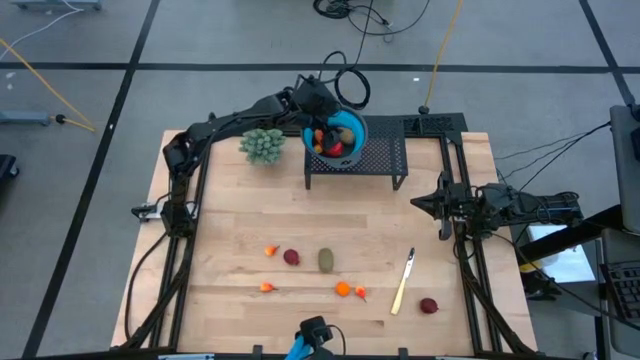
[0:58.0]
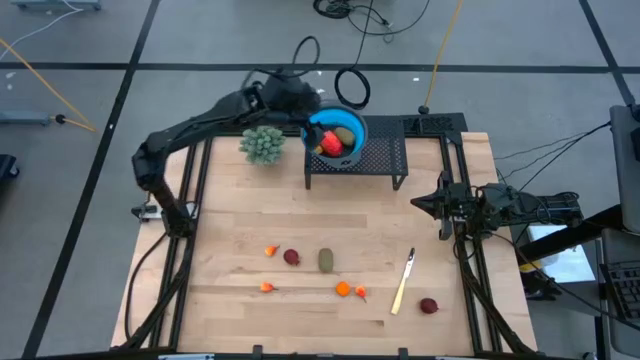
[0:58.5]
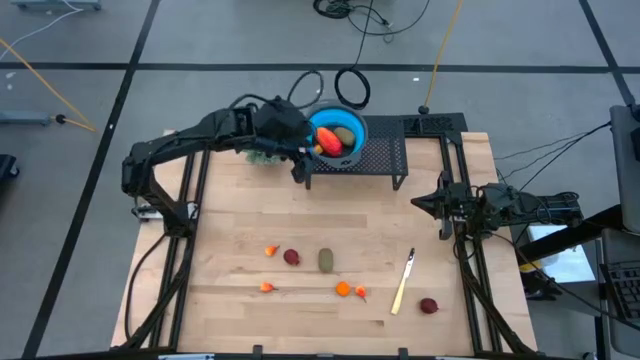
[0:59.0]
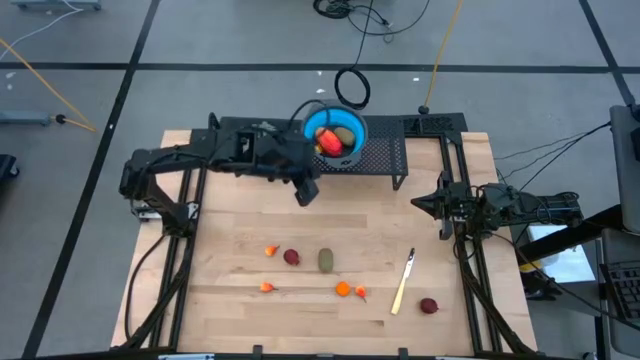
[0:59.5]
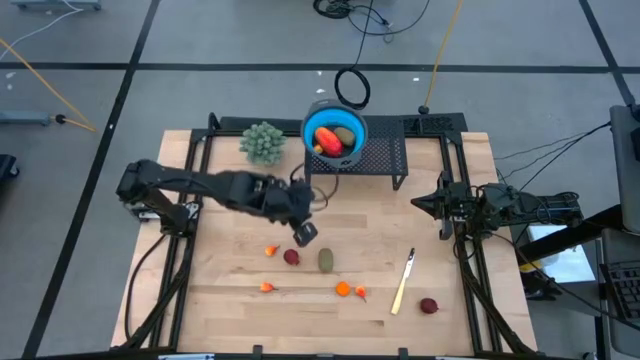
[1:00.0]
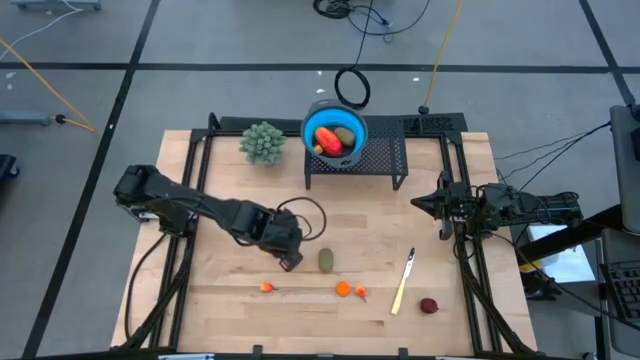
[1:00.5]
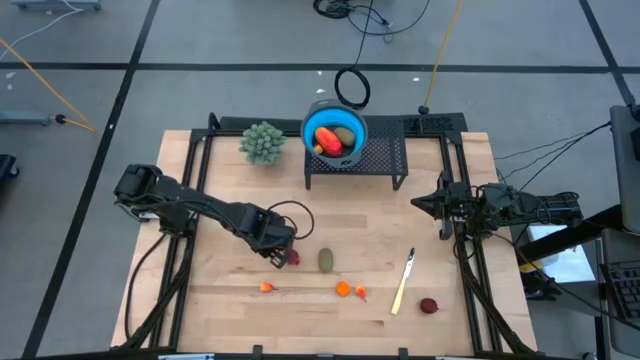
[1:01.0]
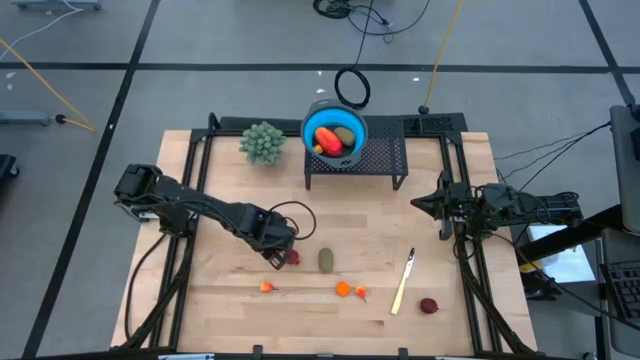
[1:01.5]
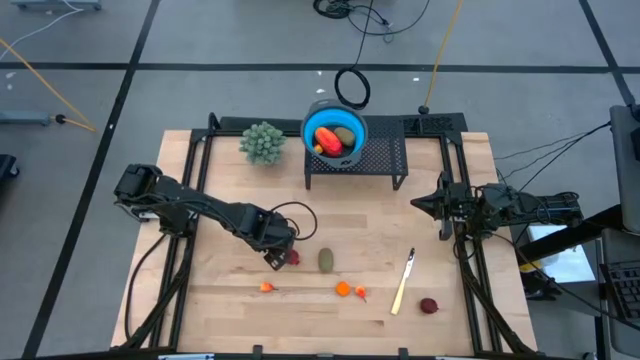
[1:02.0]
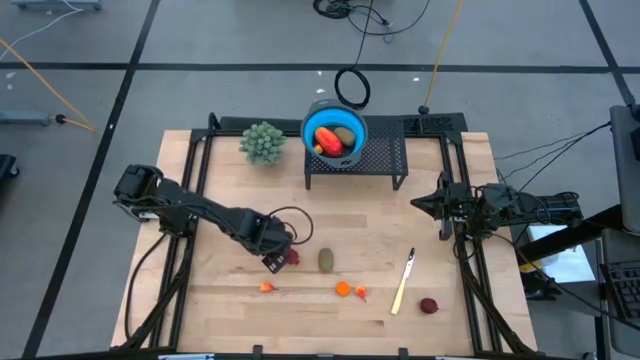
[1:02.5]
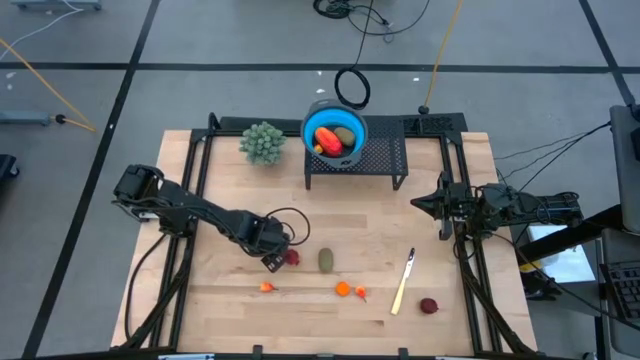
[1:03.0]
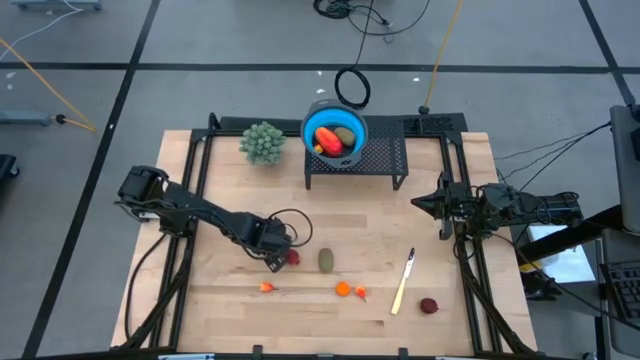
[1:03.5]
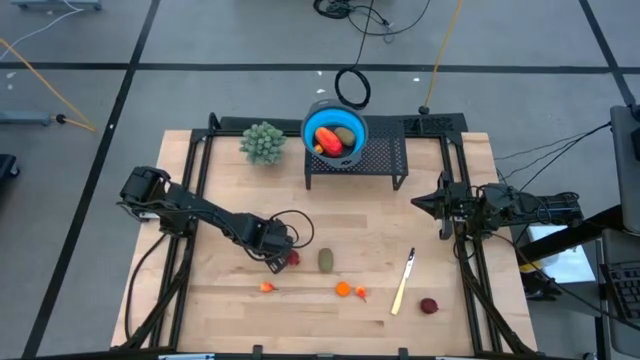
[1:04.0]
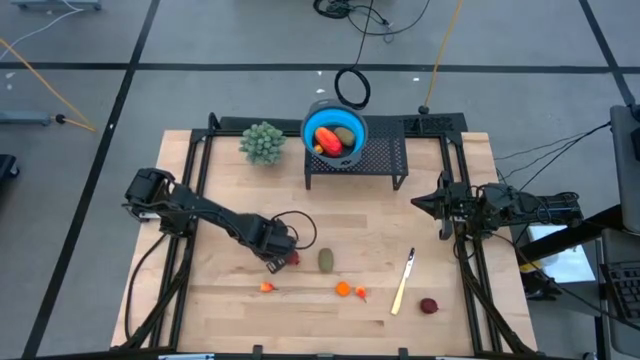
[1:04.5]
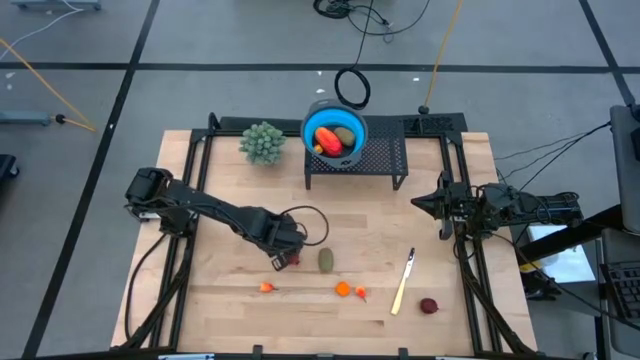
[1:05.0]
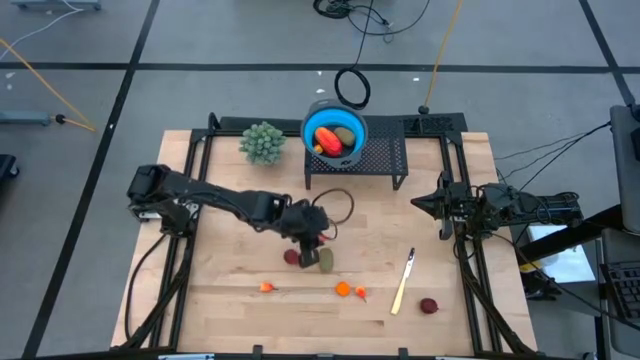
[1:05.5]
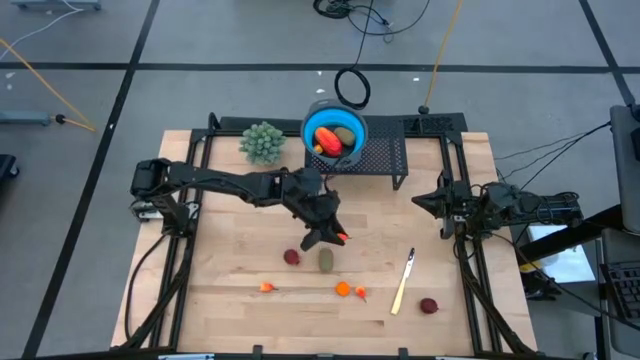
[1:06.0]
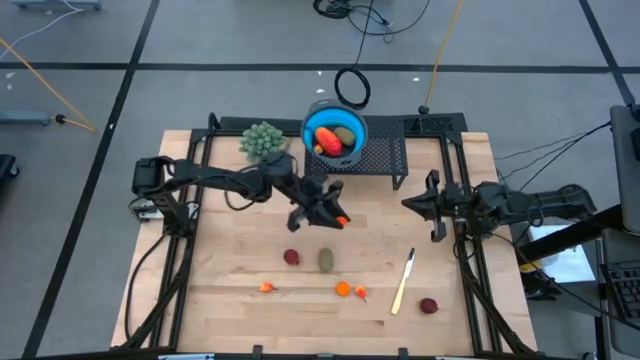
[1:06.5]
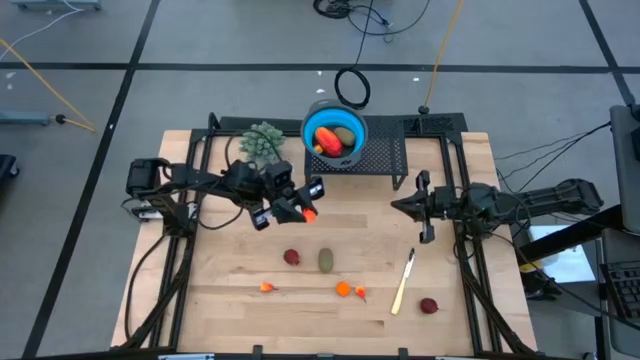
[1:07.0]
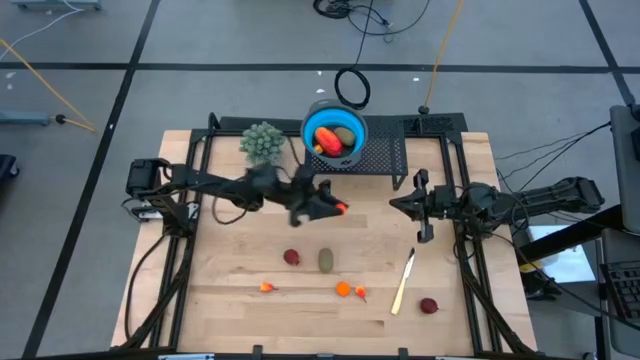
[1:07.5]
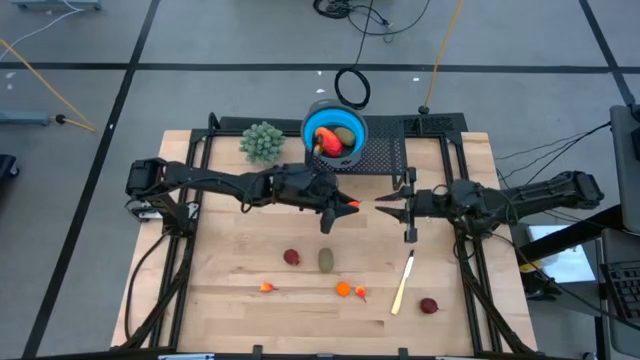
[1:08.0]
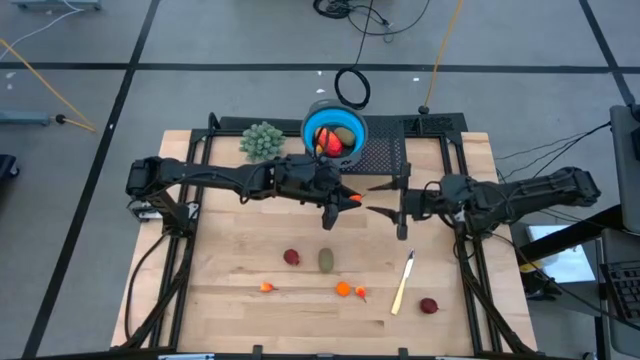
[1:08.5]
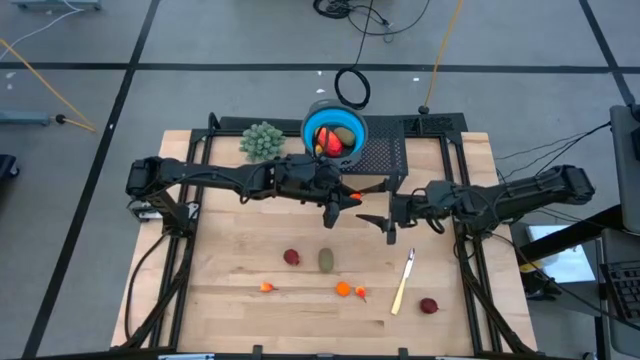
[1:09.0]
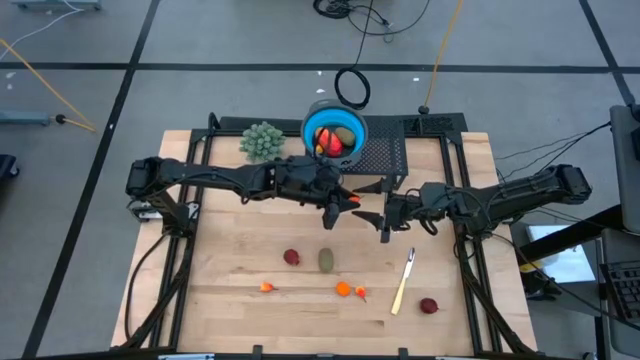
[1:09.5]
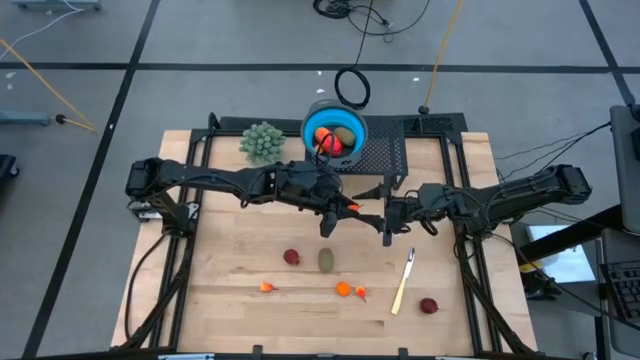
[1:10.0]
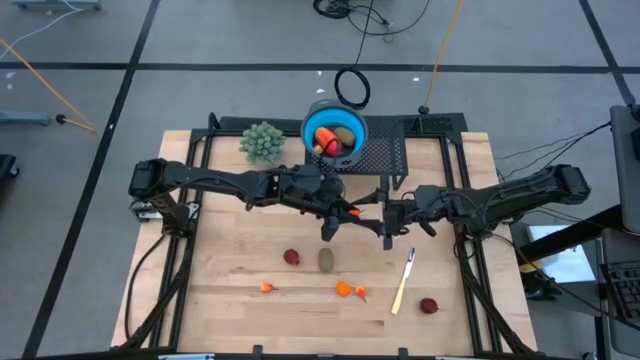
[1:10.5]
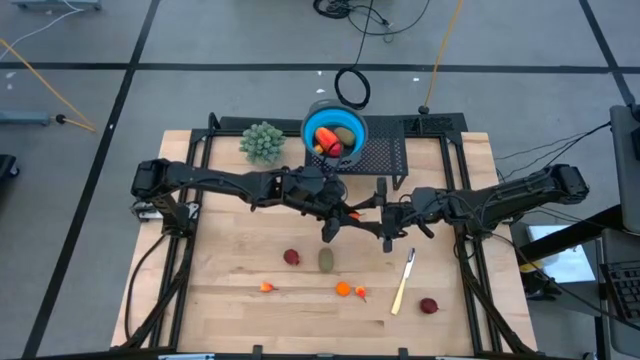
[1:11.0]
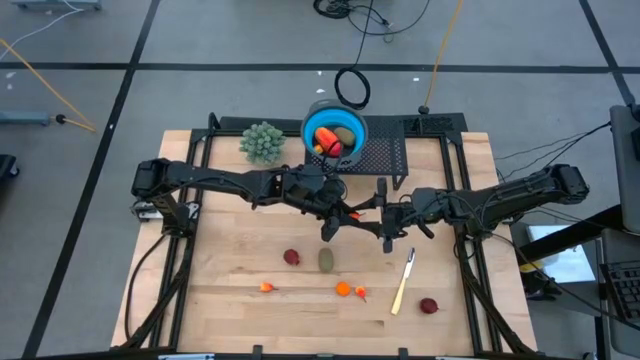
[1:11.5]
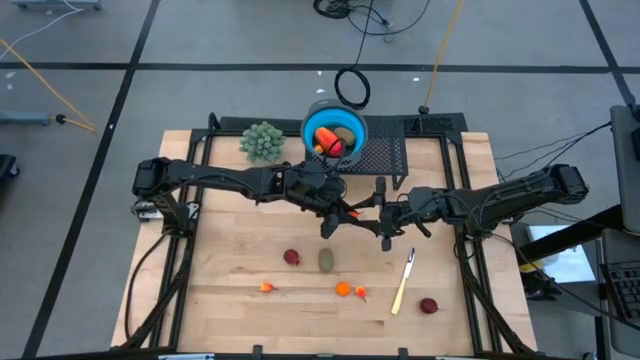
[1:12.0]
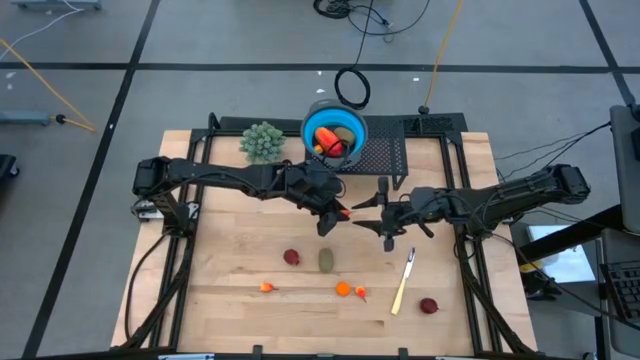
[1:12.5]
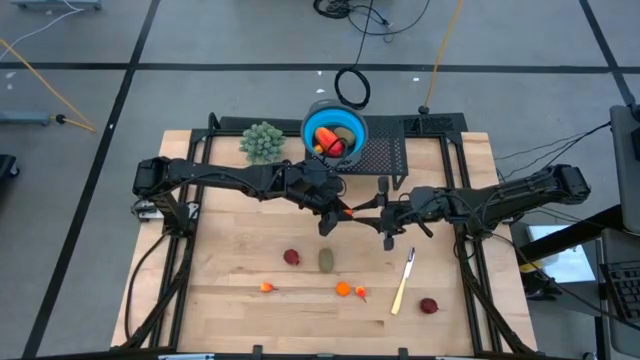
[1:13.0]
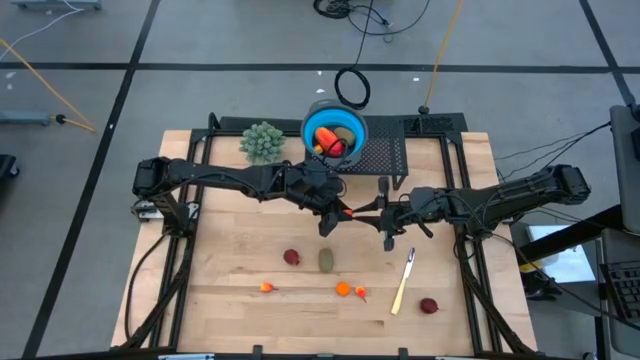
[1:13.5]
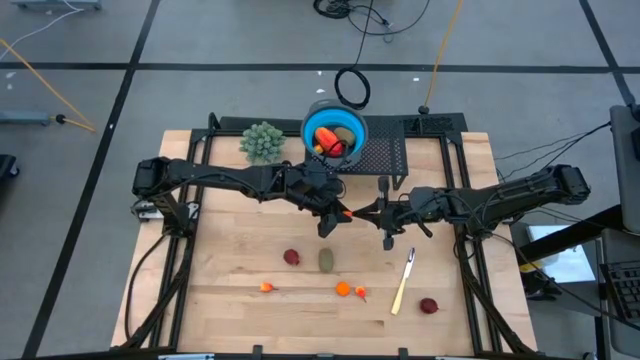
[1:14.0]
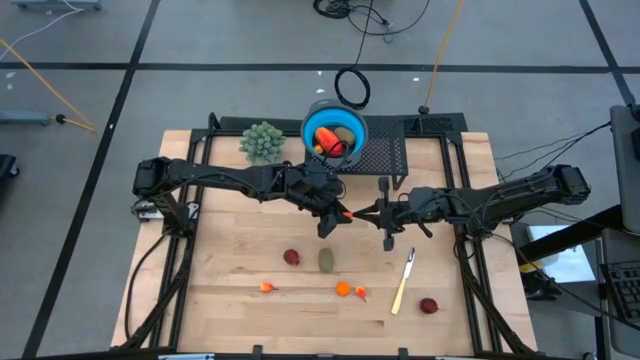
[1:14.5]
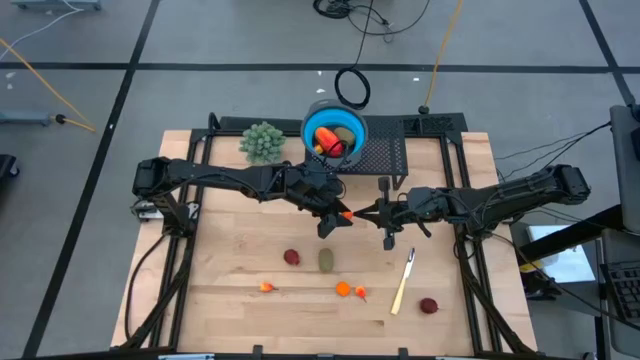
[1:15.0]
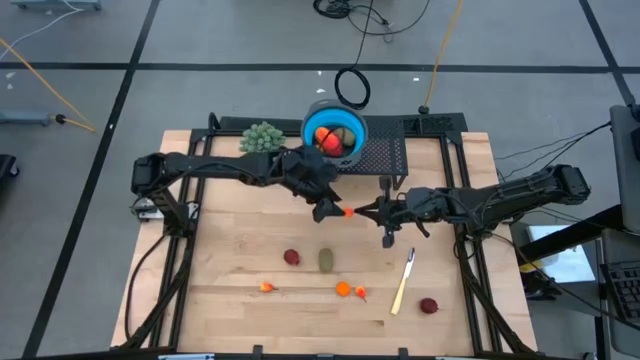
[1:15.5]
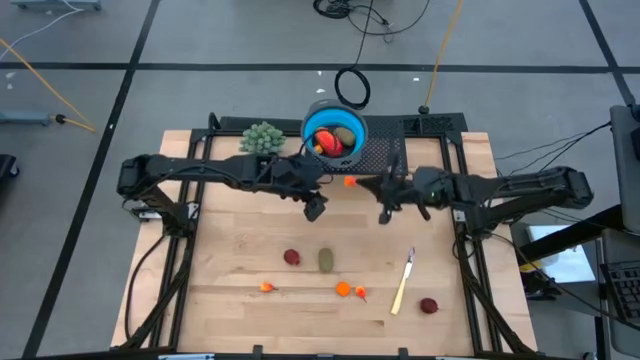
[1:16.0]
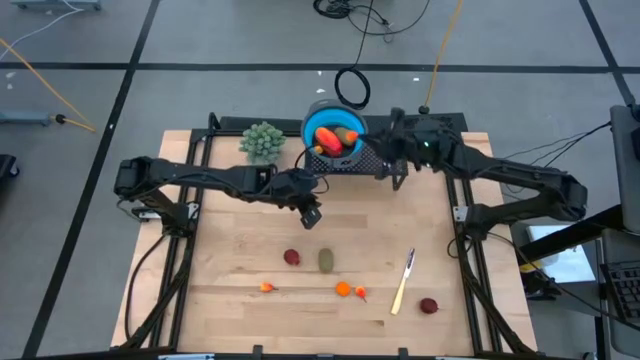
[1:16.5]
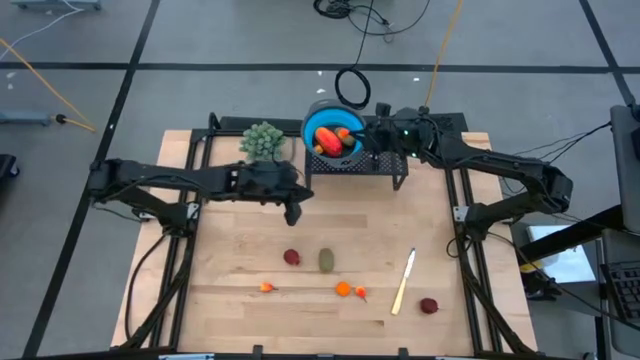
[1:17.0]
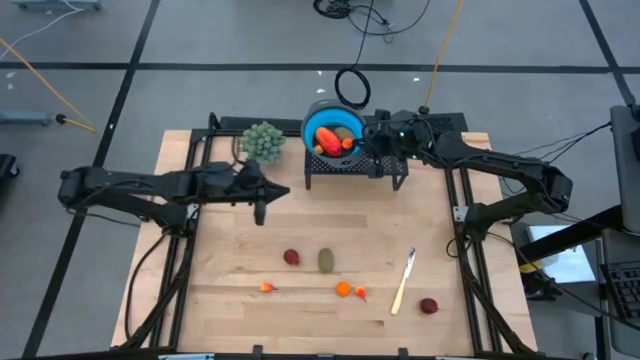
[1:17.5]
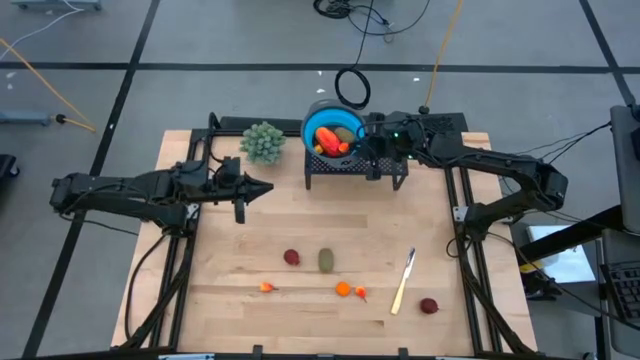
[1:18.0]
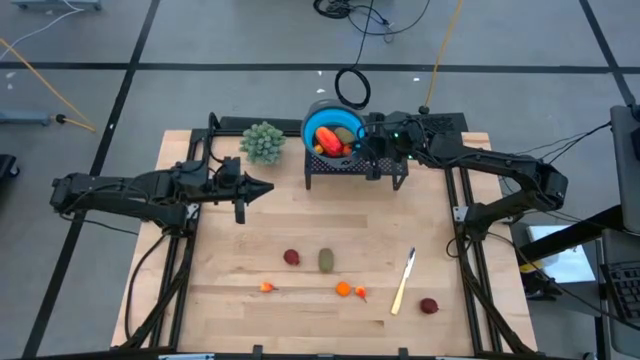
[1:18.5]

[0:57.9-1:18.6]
Task: Pick & Place Fruit
Put the peach into the blue strainer on the shelf
